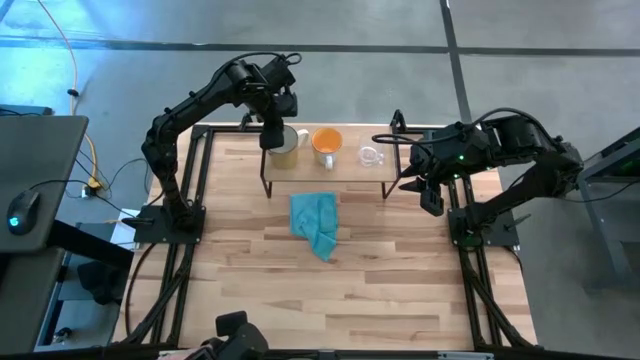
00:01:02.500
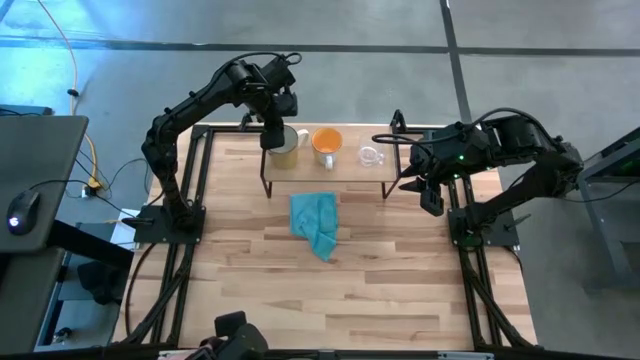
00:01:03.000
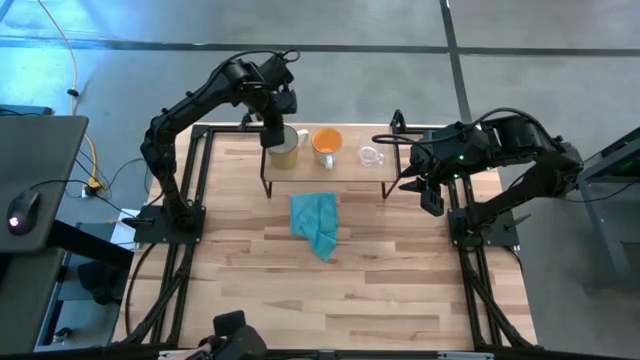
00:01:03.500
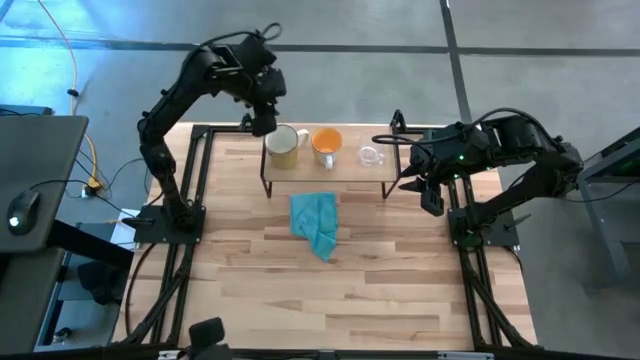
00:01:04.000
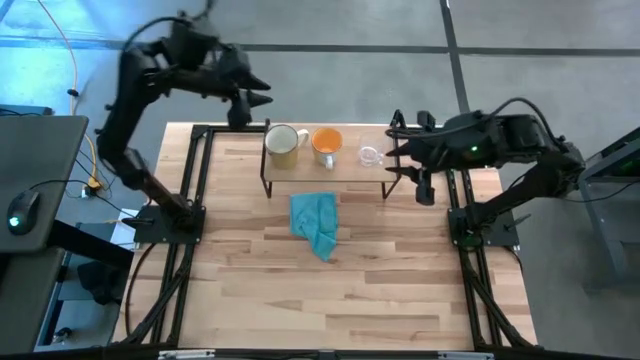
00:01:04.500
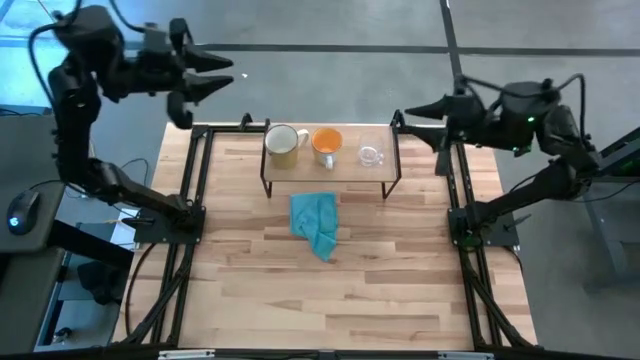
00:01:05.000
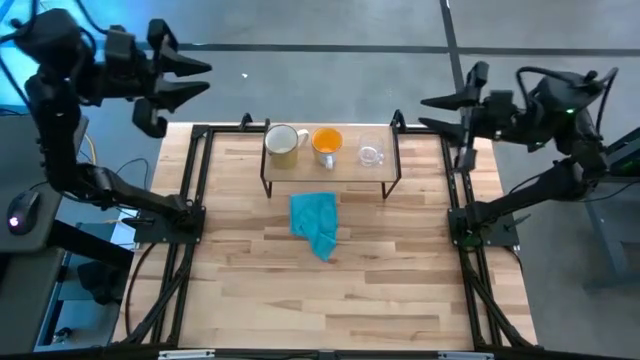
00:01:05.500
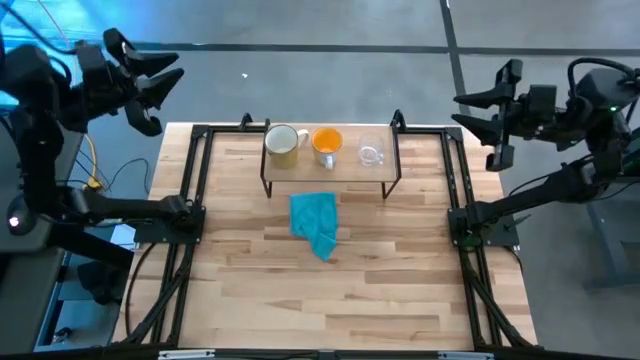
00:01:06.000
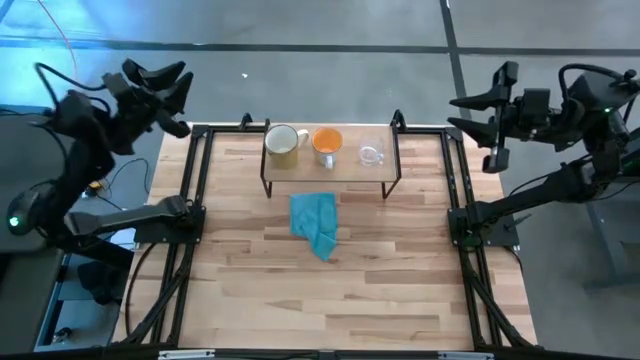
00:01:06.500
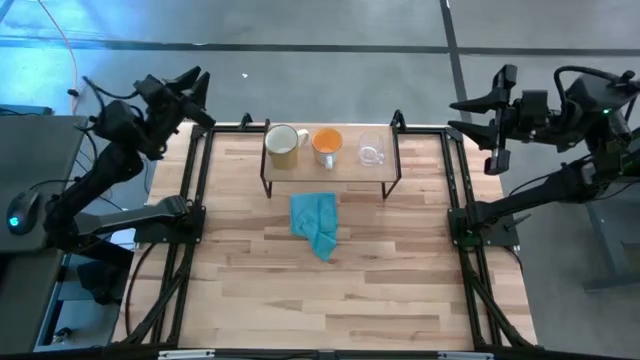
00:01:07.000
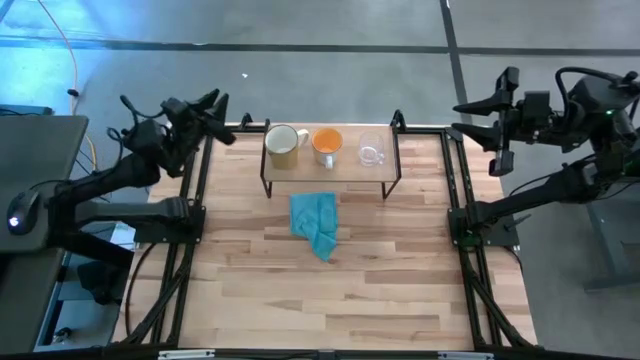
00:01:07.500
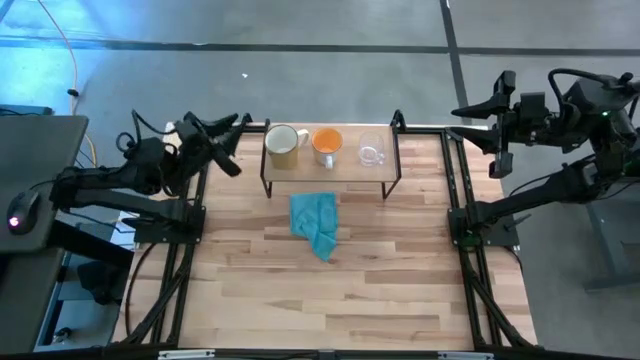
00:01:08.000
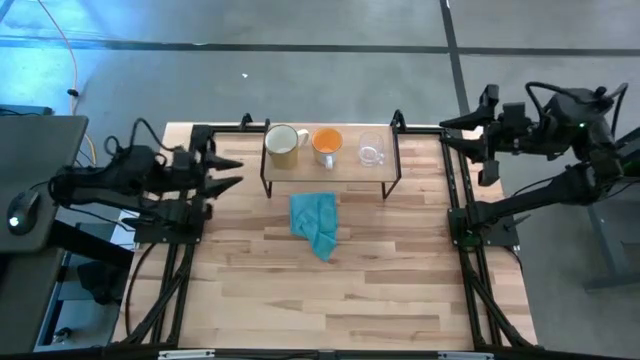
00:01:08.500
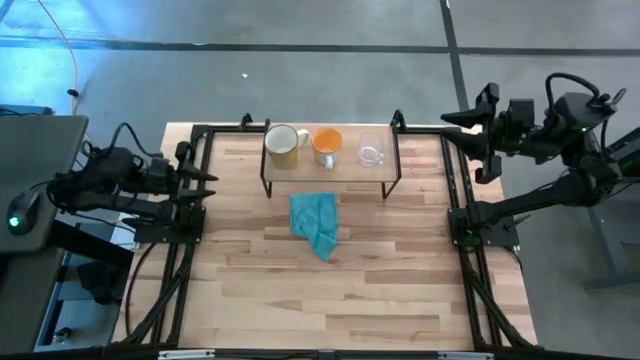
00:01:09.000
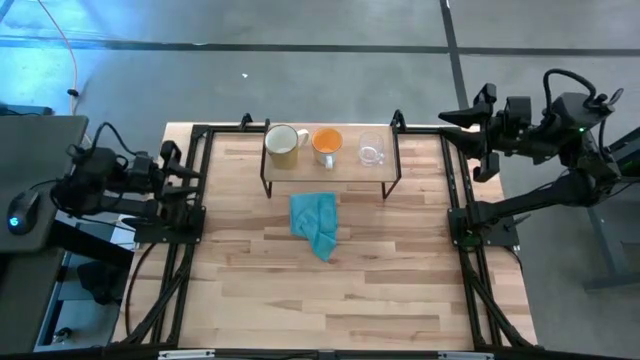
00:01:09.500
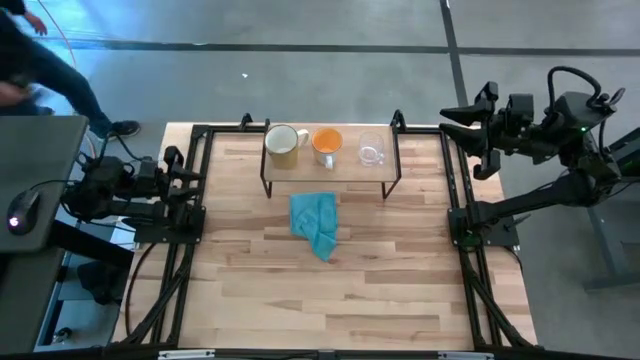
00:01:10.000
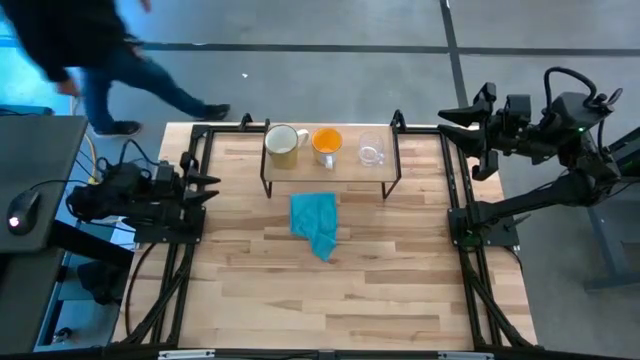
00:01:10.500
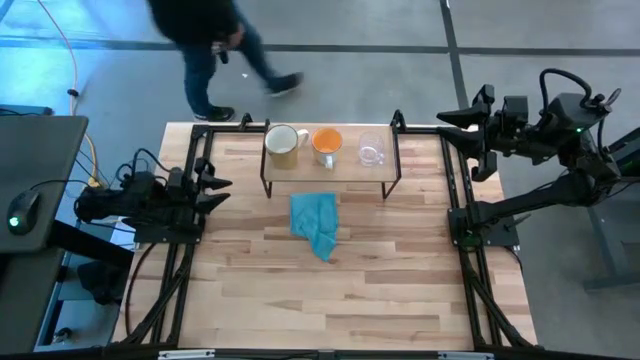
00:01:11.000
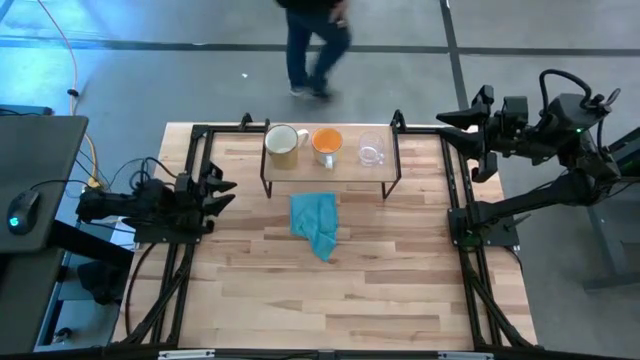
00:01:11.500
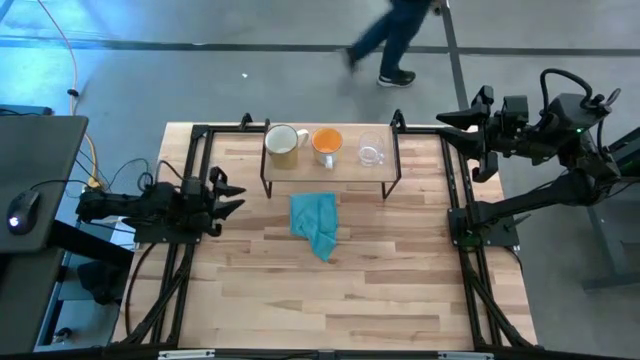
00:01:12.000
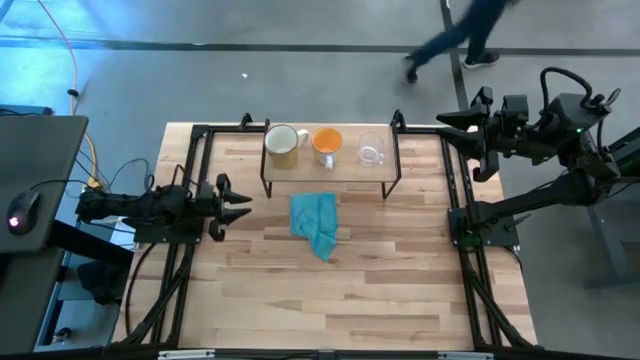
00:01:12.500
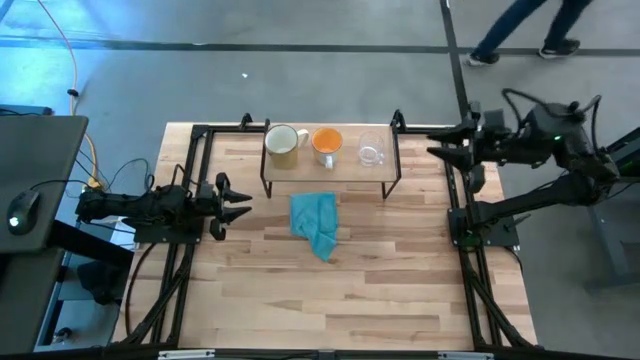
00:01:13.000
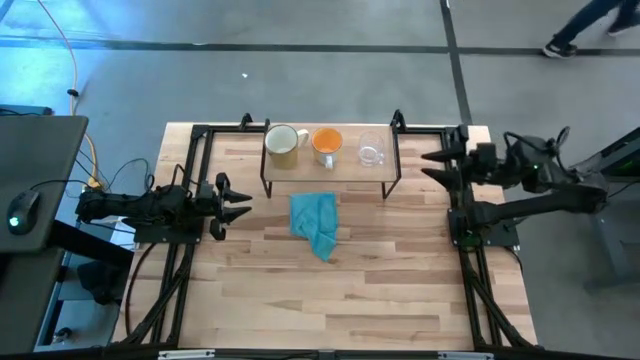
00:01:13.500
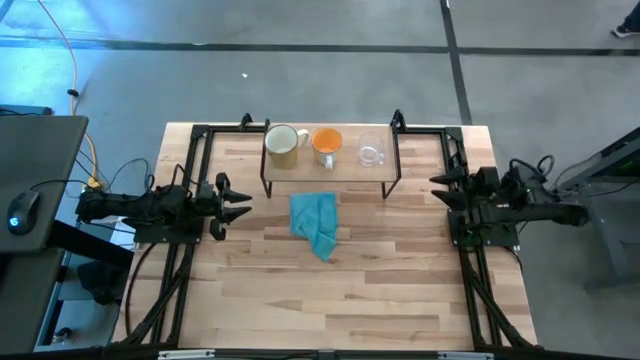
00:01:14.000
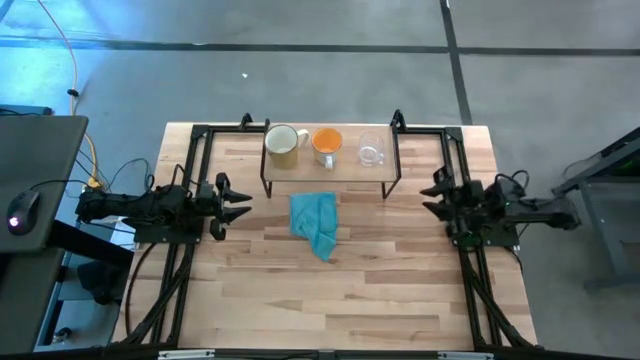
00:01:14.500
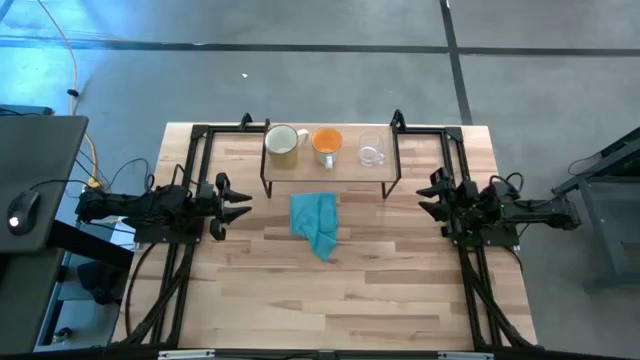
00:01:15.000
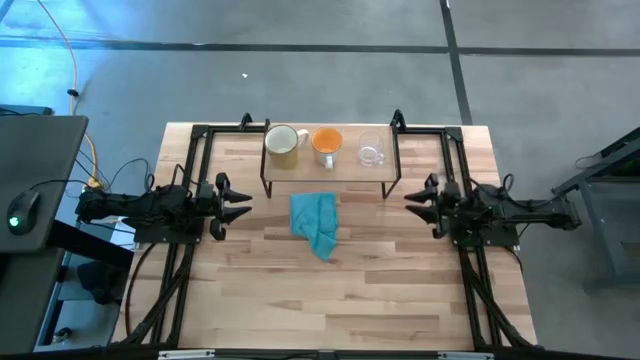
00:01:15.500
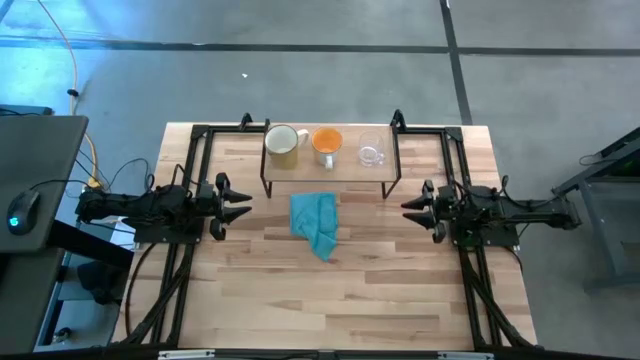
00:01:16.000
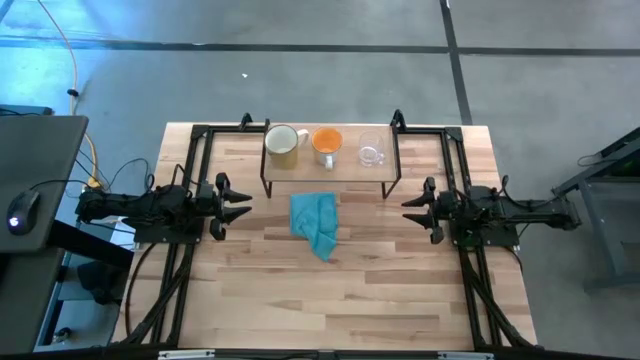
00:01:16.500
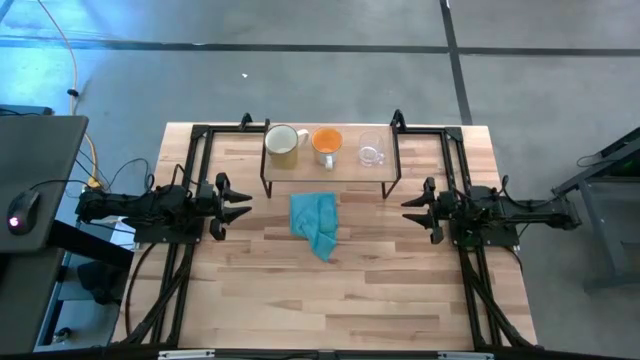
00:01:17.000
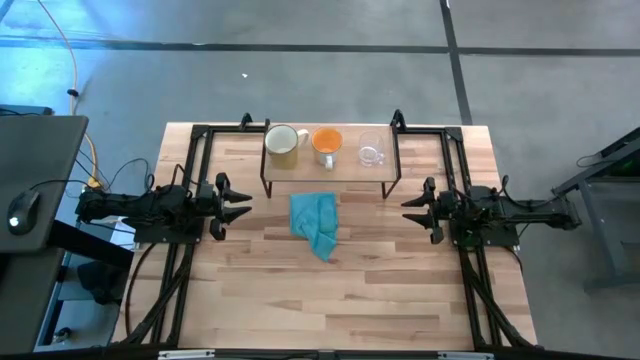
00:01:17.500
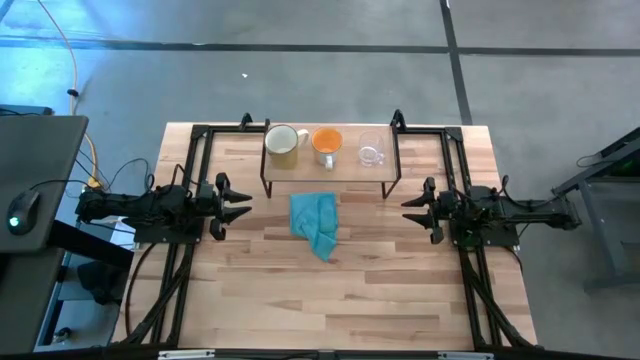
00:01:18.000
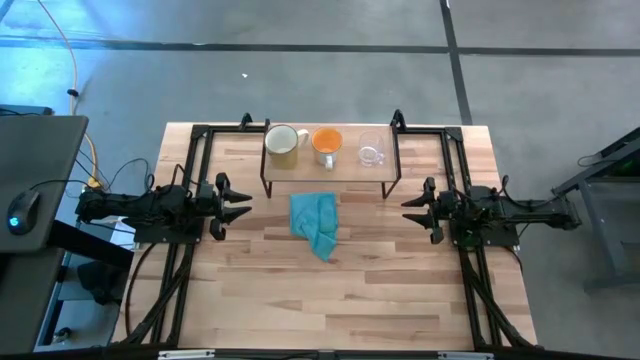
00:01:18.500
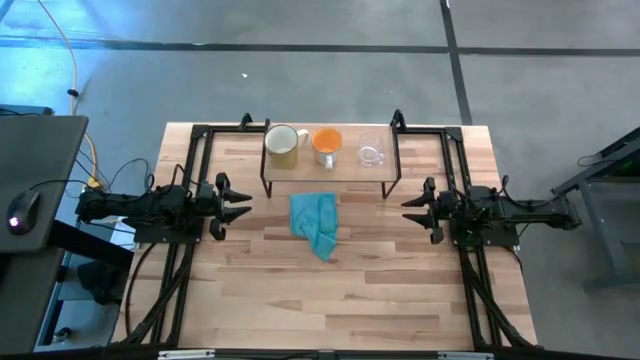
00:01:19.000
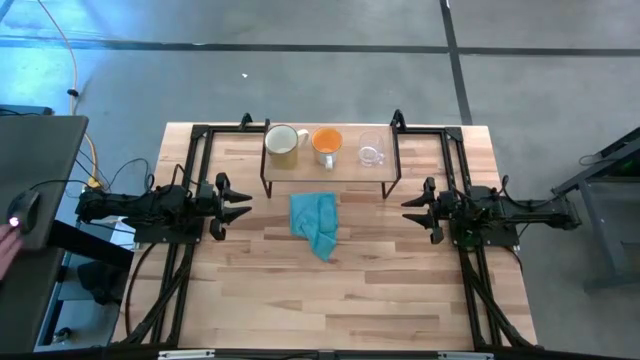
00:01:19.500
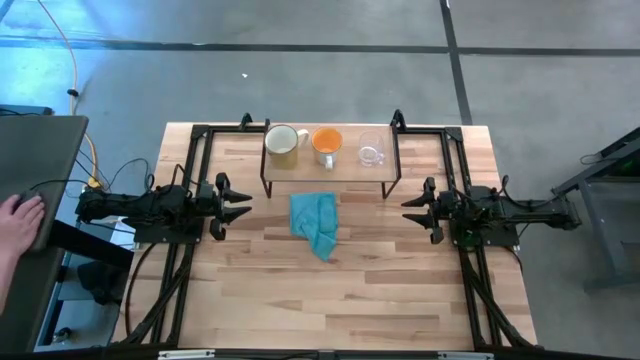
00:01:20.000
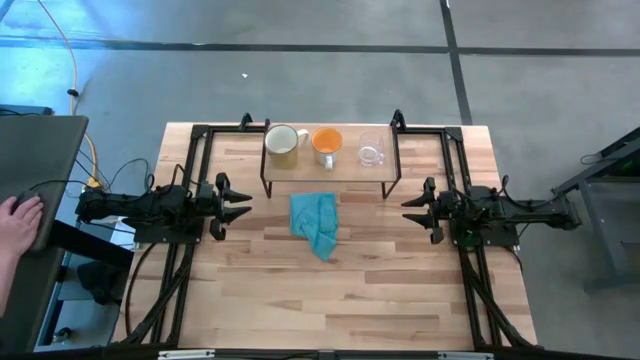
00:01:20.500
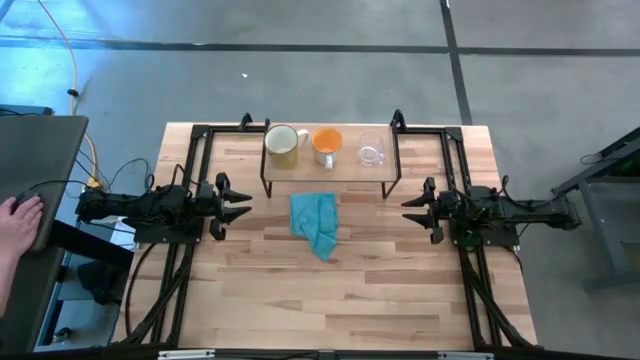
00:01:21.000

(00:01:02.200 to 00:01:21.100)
Task: Stack small to large cups/mugs on shelf
Return to Home Position
